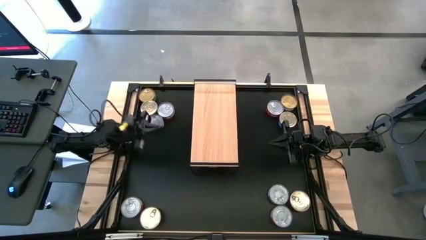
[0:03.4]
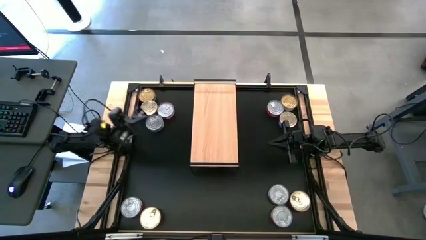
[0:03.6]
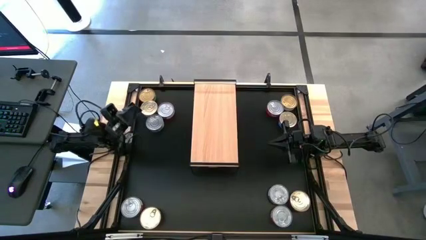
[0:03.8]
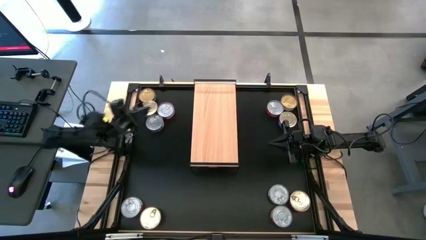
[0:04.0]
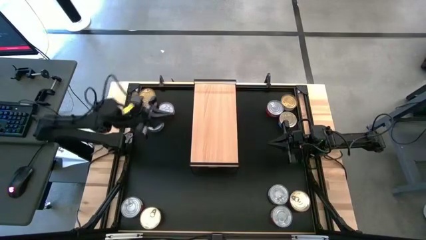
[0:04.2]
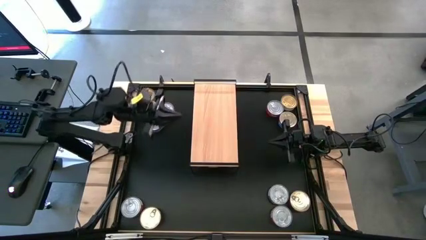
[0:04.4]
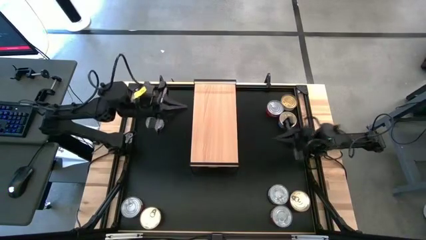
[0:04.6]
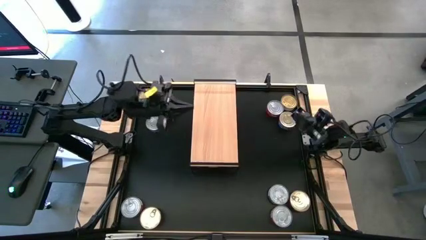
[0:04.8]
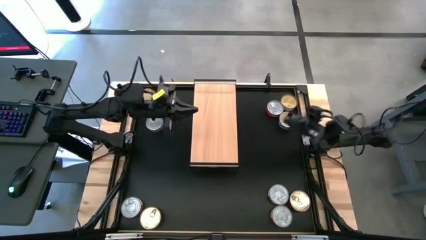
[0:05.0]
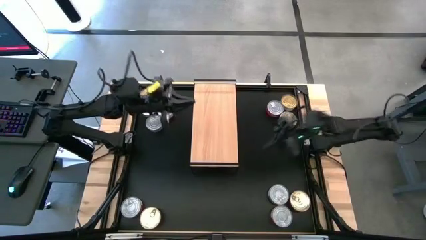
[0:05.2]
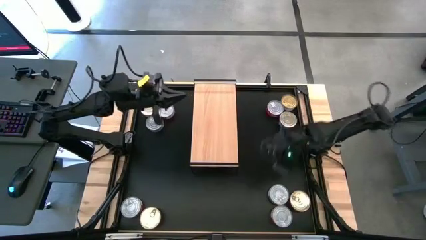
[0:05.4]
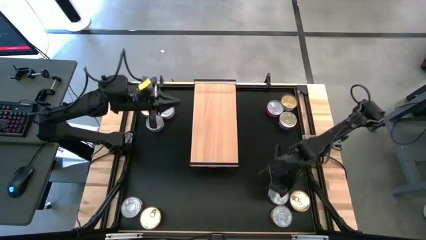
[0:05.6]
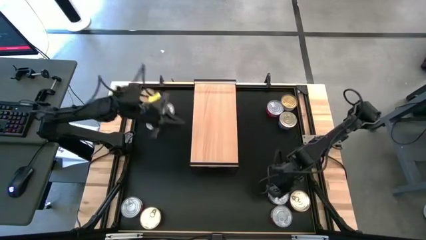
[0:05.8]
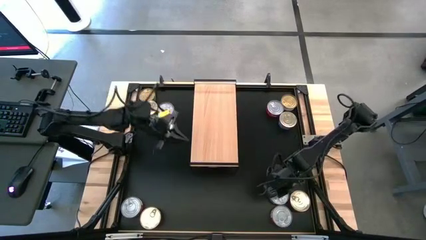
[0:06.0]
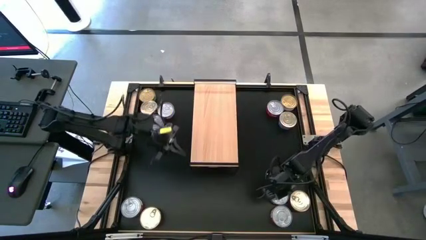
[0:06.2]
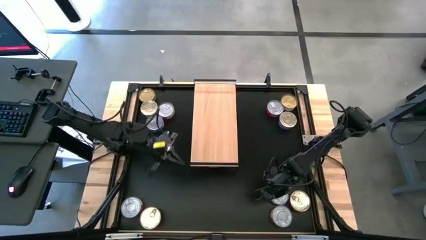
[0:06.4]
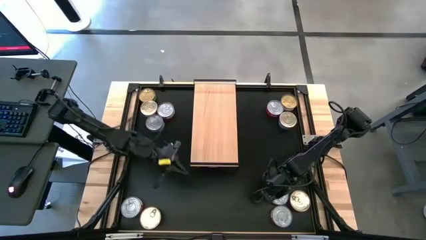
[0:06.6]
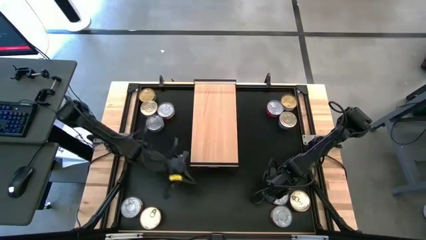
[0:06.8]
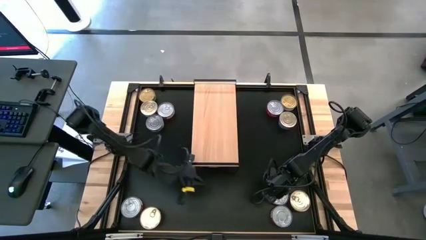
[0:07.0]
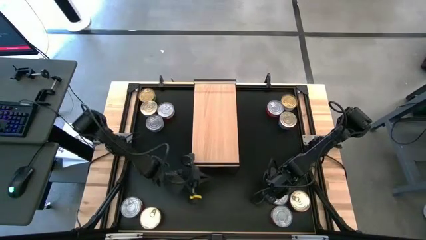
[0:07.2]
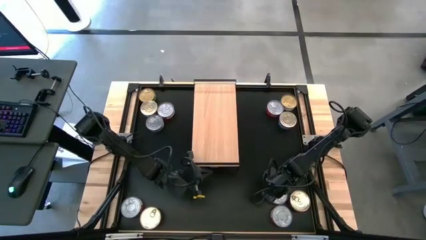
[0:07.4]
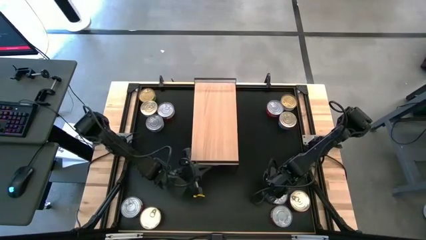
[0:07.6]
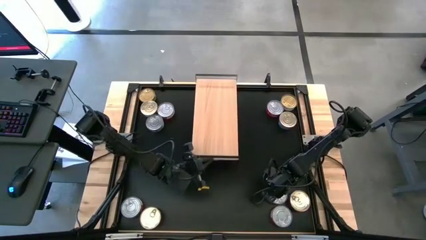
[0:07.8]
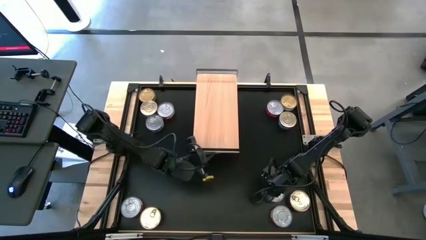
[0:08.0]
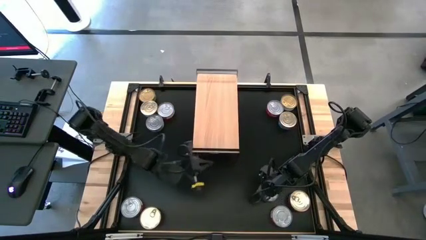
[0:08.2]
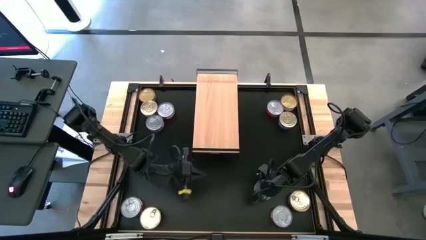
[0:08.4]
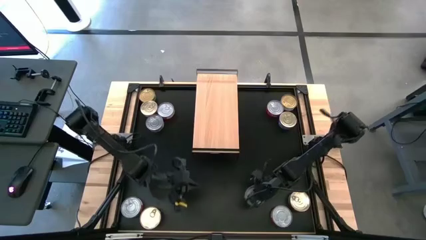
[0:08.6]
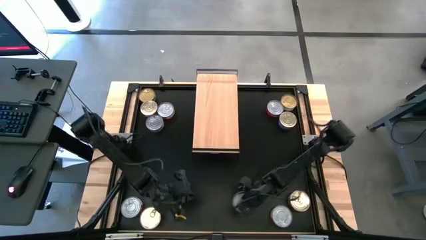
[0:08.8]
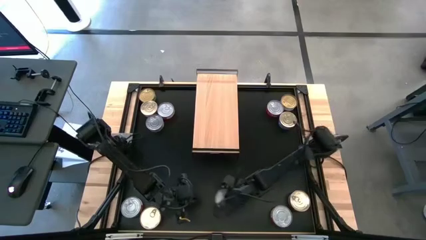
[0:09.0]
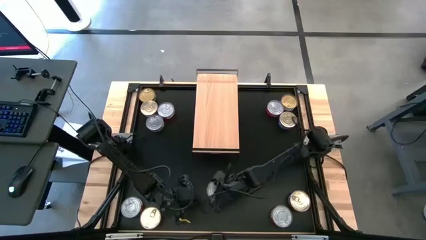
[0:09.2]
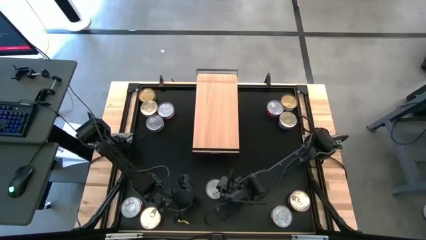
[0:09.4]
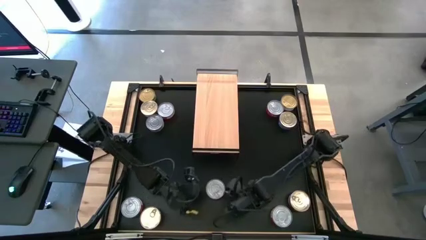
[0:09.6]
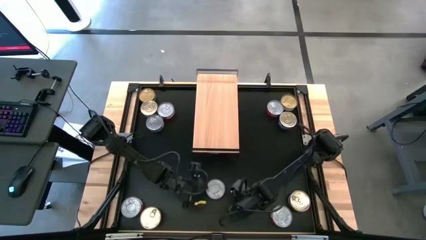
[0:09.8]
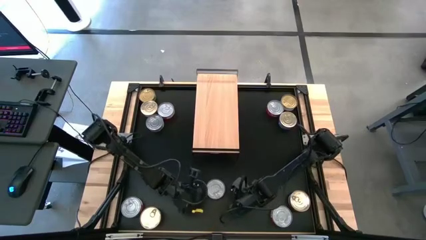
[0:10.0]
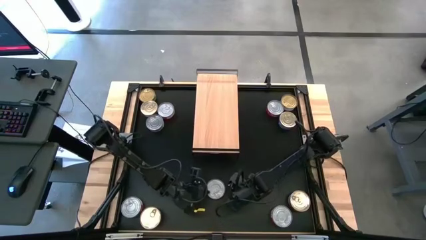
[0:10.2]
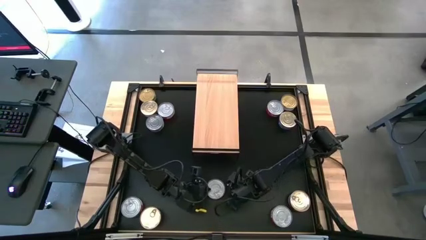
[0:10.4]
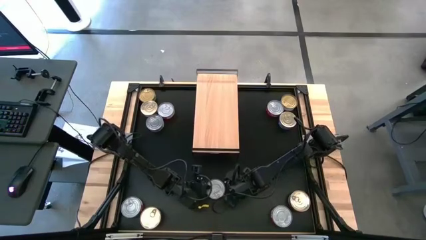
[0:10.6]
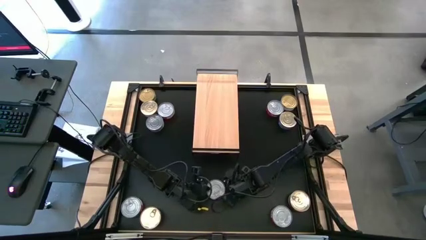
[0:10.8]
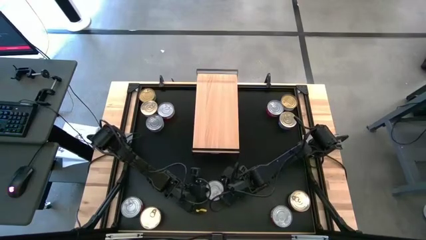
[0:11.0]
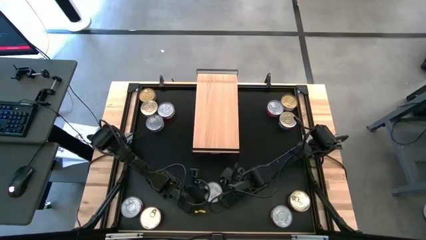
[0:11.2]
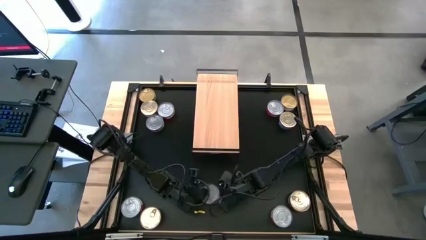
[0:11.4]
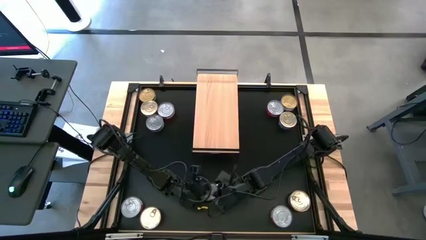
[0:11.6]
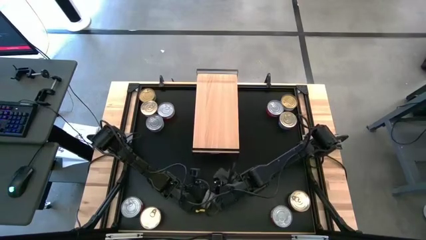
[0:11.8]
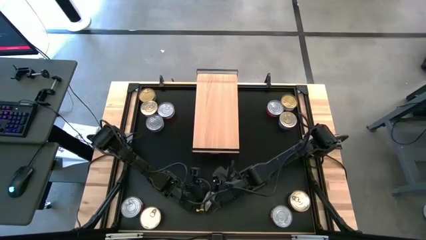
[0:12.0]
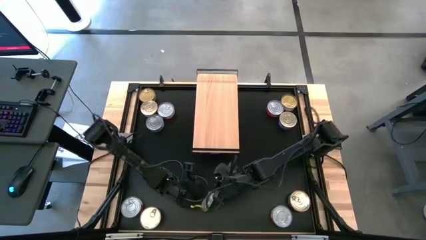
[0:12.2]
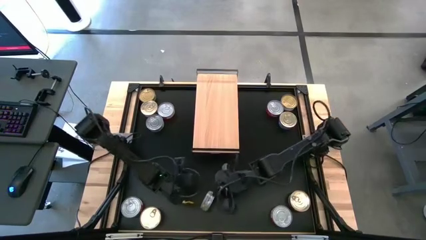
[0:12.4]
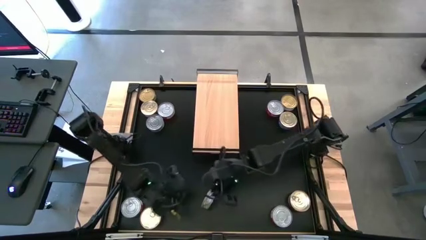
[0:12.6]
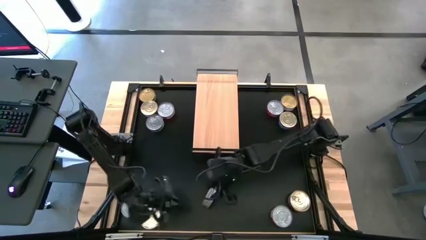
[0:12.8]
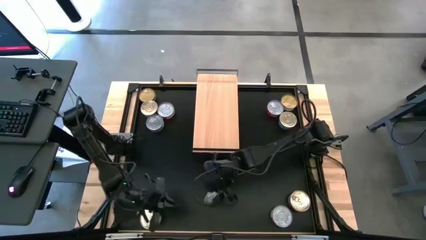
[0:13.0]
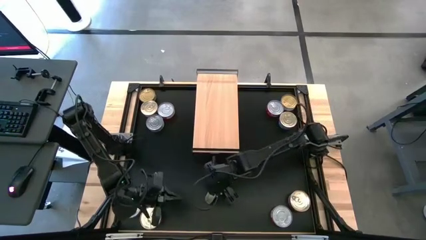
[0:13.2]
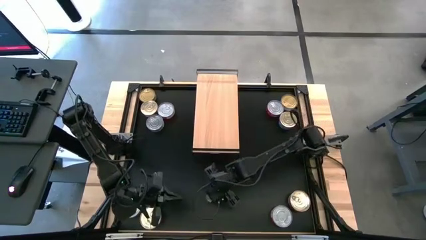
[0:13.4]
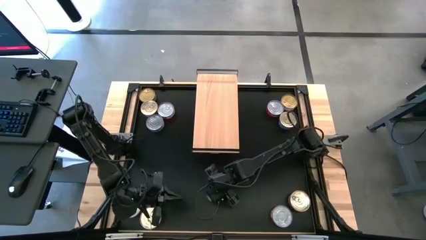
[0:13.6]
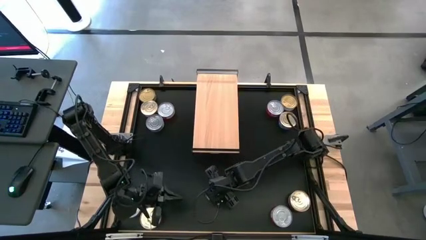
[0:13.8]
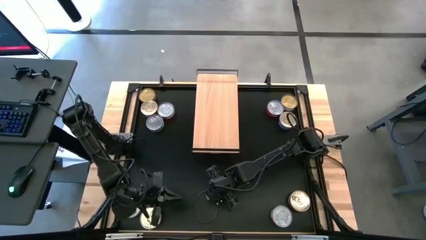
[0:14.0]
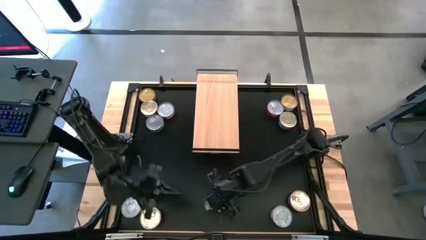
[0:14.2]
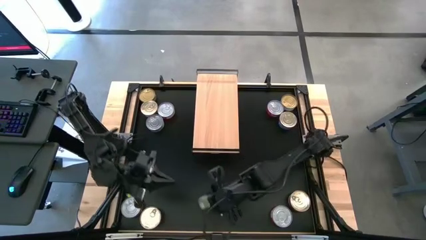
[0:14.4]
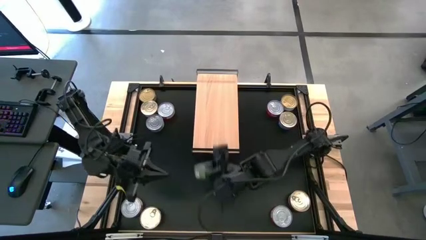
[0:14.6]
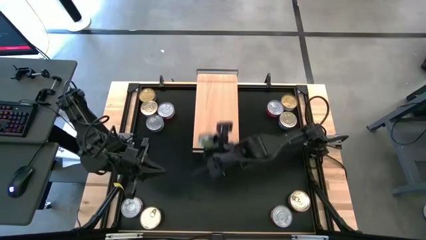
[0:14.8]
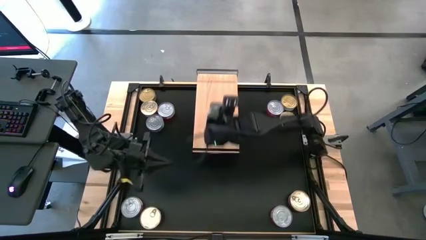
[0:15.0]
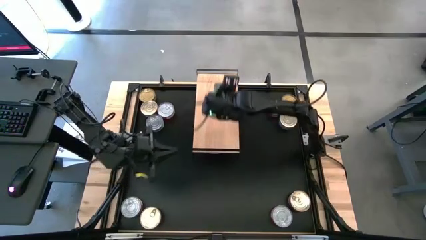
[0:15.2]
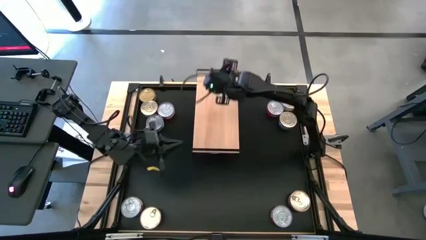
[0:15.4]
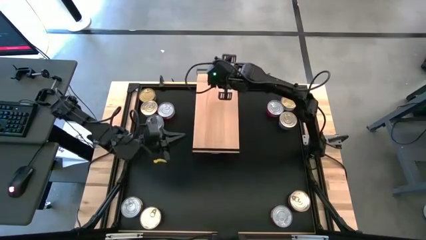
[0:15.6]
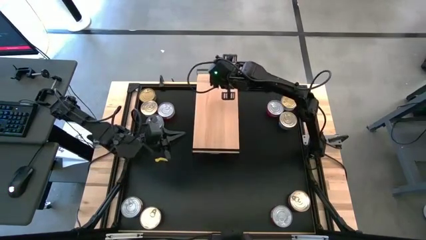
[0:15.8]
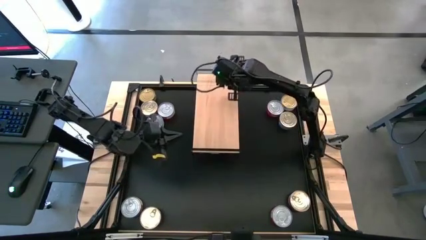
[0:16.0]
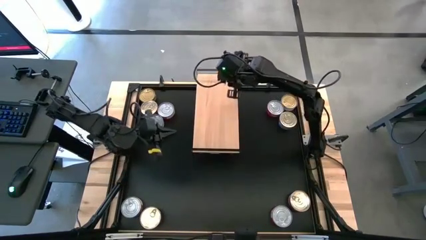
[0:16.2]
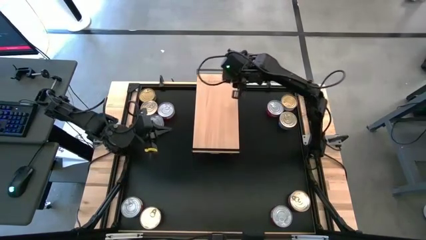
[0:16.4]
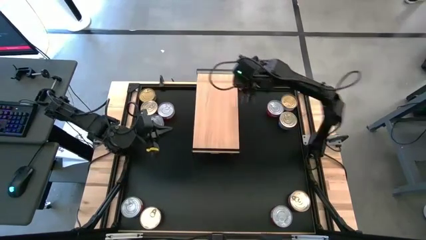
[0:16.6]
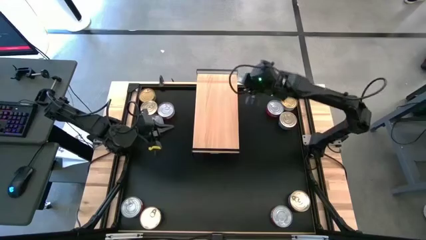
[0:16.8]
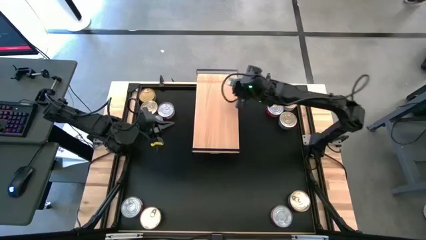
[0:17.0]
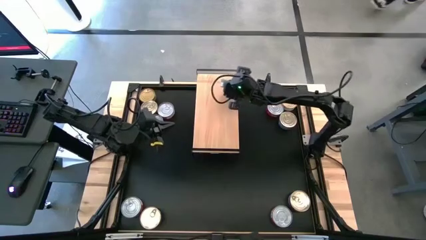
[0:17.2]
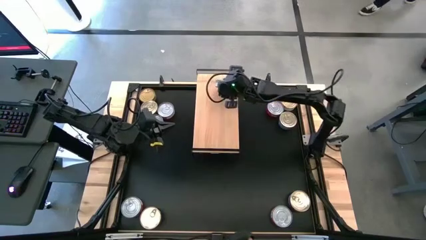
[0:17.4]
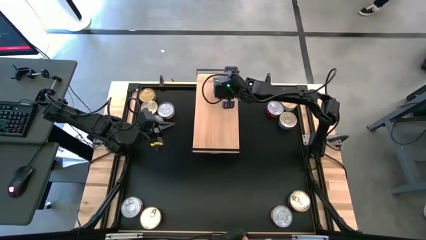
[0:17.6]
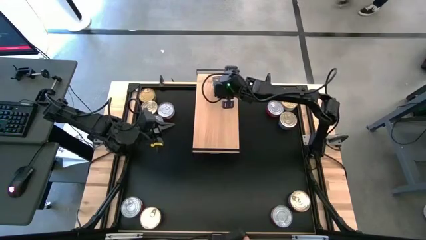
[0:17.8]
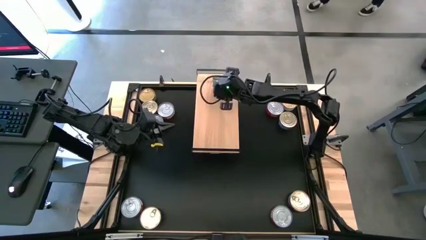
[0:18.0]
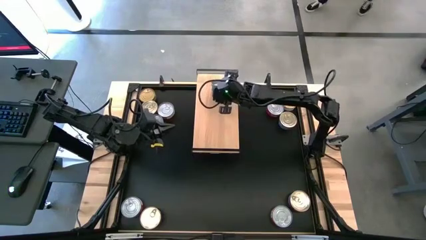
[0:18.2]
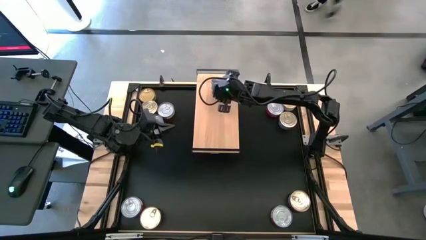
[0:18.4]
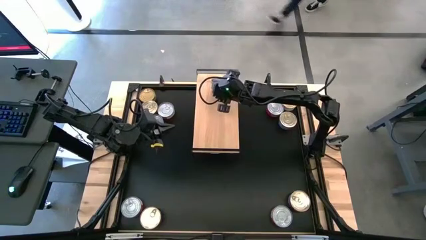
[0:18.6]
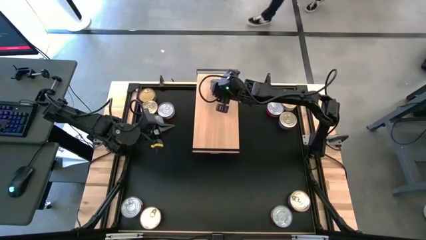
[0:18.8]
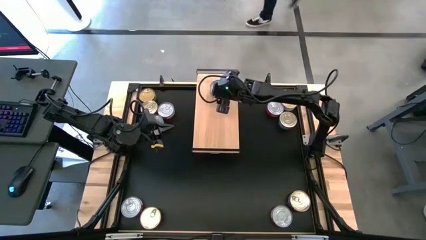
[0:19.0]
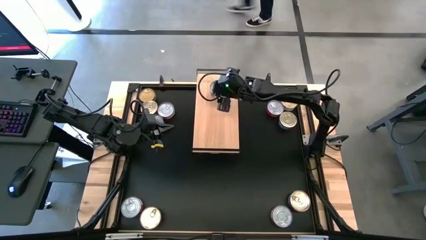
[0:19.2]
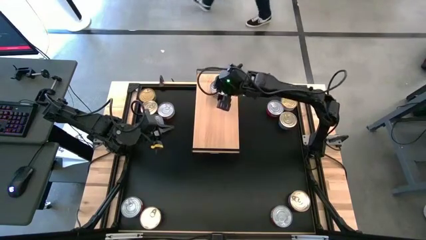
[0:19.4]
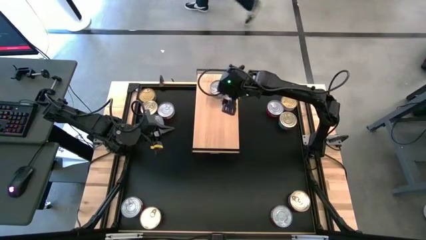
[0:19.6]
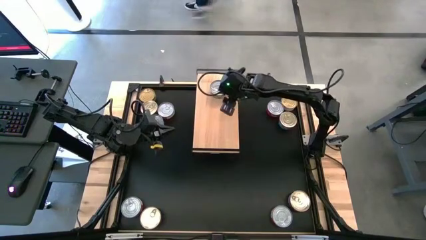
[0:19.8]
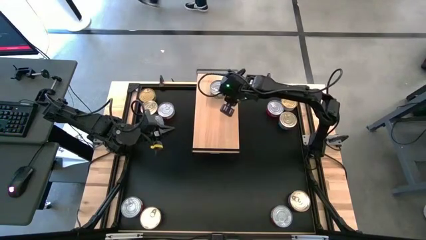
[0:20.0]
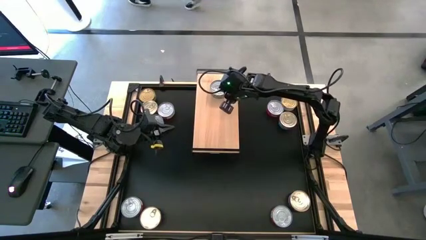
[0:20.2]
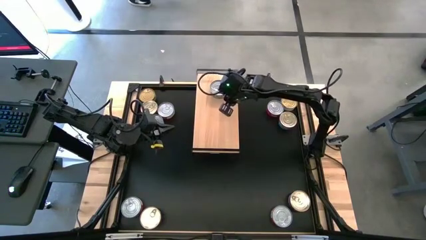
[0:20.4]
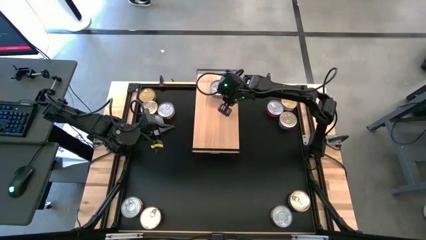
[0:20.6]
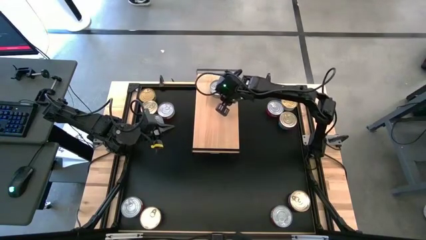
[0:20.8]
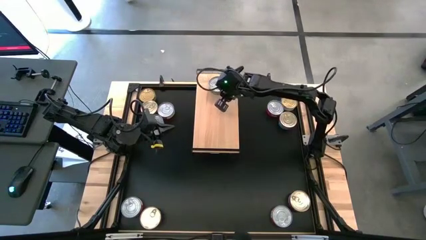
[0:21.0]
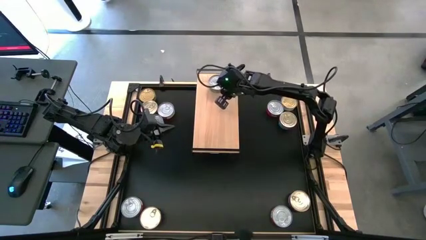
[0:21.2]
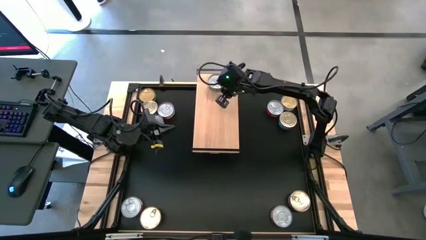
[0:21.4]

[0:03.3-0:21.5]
Task: Stack canned seafood by type on shelf
Put the green tuna can on the shelf
